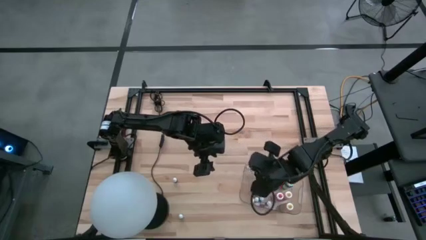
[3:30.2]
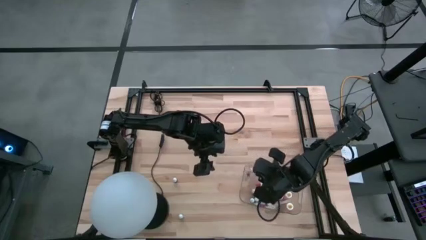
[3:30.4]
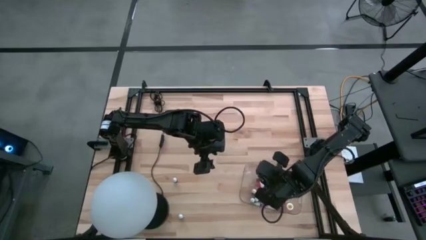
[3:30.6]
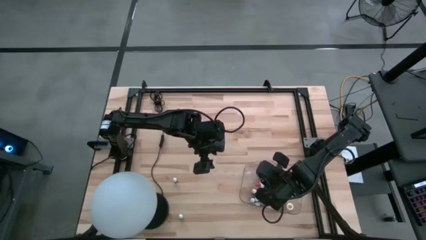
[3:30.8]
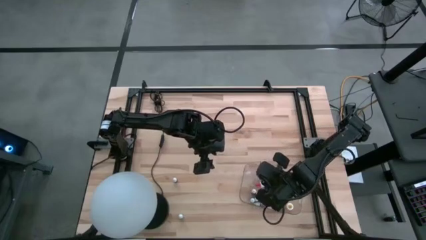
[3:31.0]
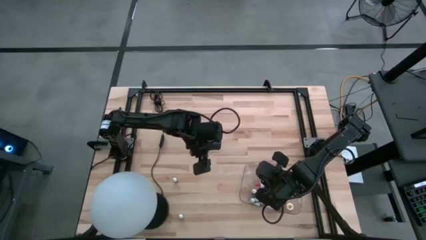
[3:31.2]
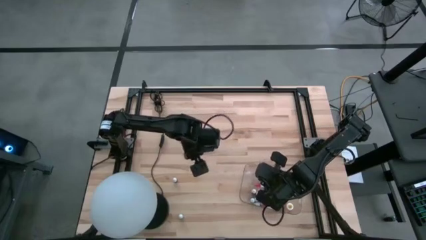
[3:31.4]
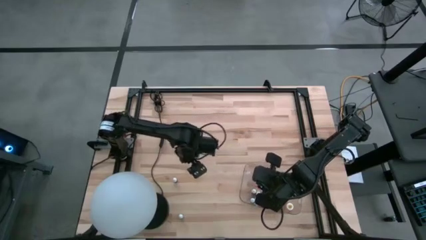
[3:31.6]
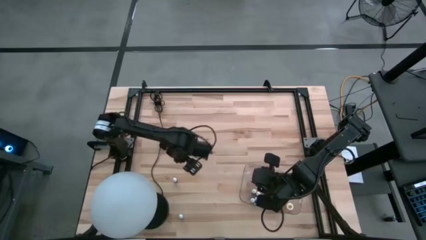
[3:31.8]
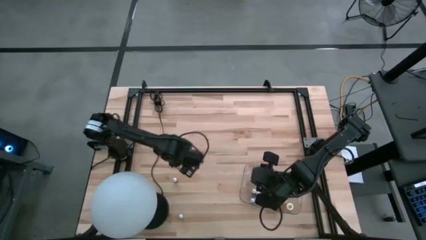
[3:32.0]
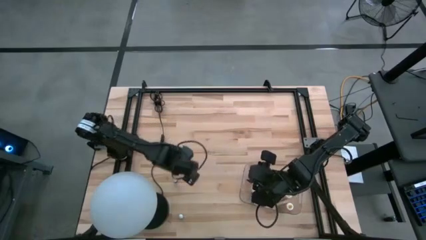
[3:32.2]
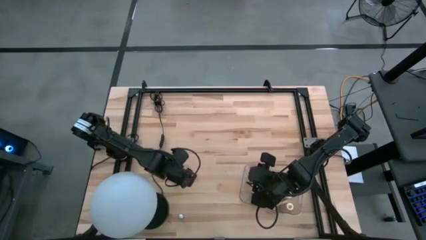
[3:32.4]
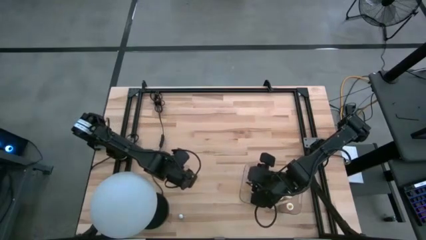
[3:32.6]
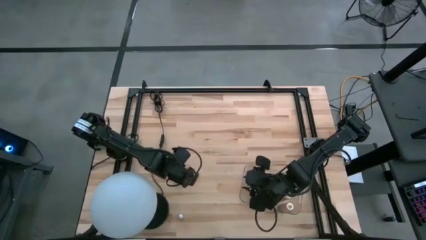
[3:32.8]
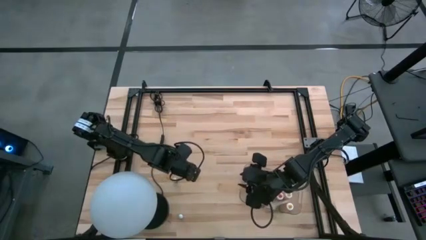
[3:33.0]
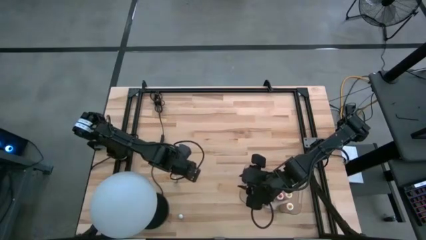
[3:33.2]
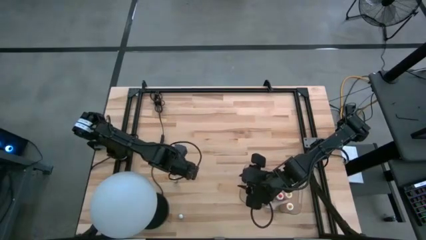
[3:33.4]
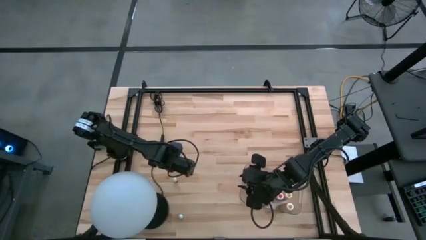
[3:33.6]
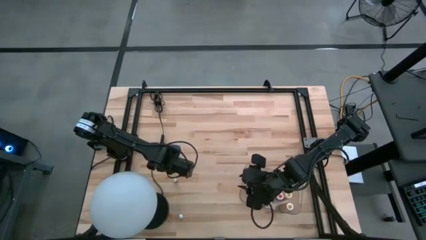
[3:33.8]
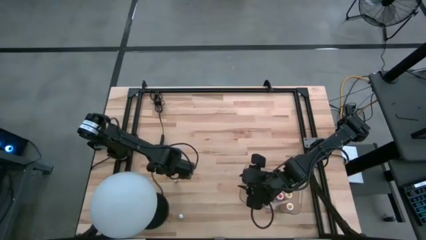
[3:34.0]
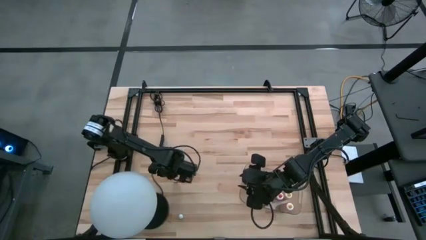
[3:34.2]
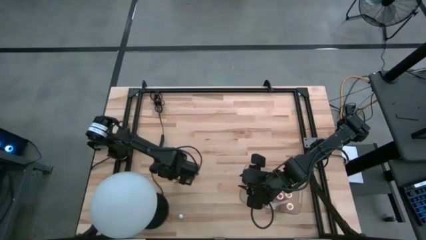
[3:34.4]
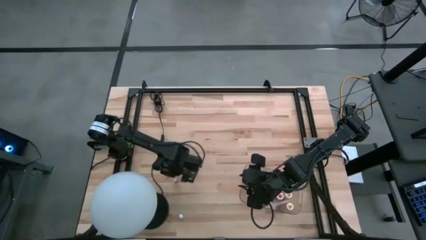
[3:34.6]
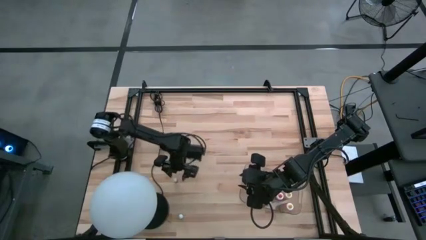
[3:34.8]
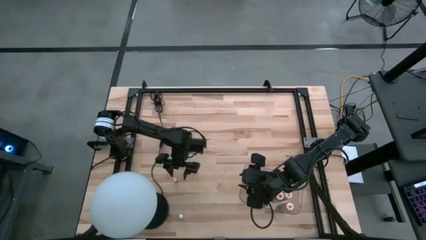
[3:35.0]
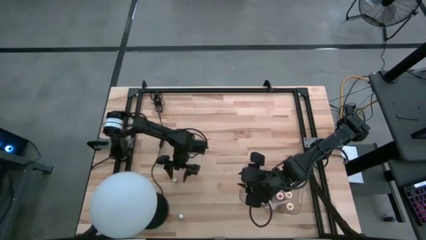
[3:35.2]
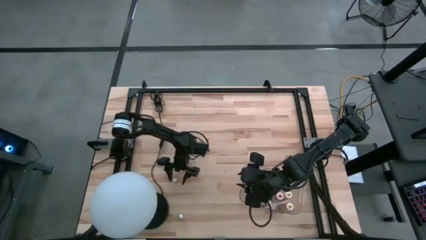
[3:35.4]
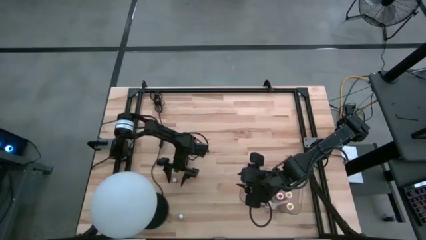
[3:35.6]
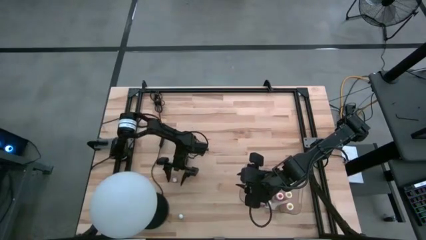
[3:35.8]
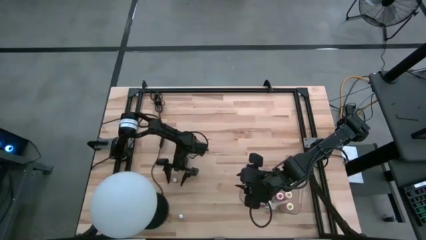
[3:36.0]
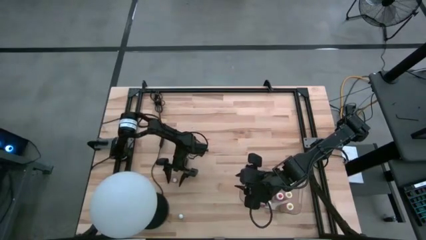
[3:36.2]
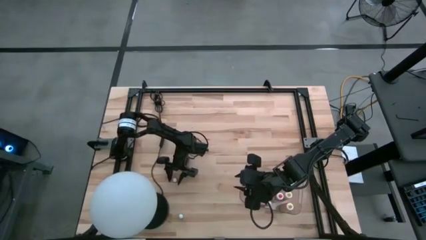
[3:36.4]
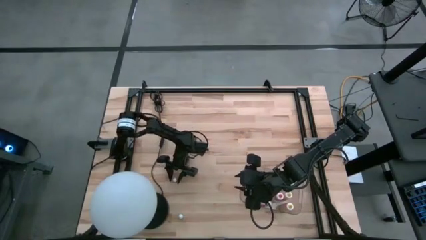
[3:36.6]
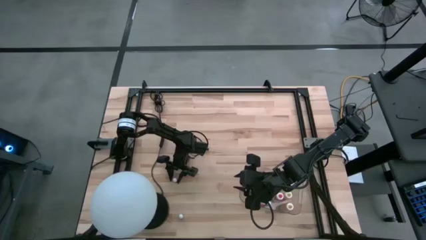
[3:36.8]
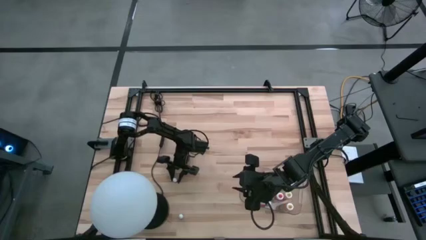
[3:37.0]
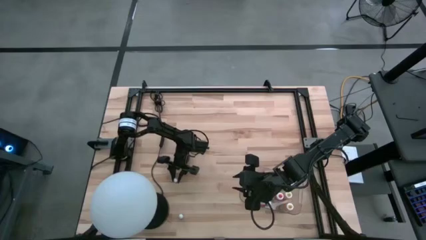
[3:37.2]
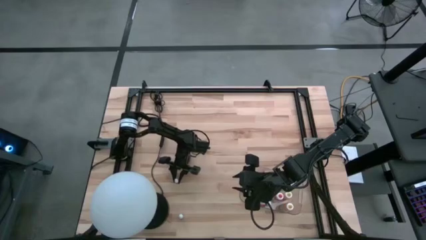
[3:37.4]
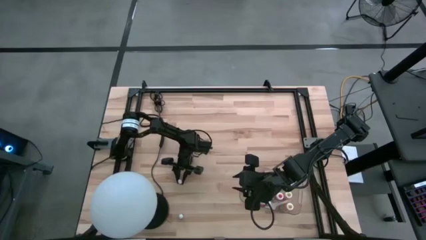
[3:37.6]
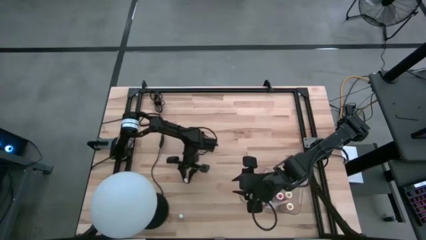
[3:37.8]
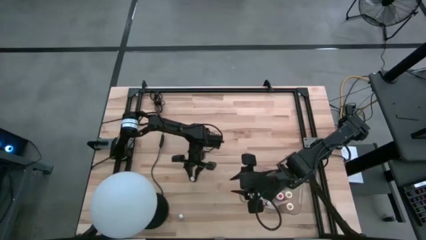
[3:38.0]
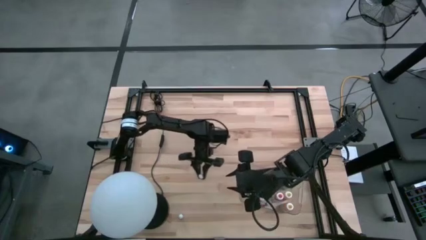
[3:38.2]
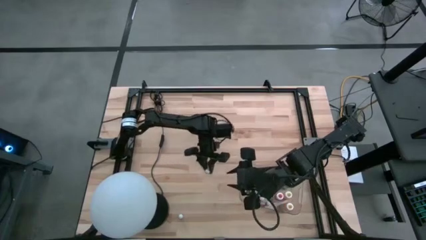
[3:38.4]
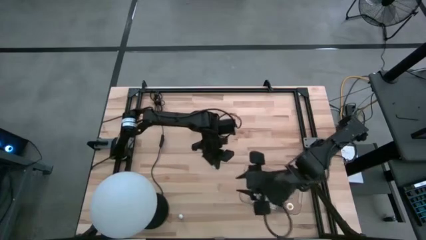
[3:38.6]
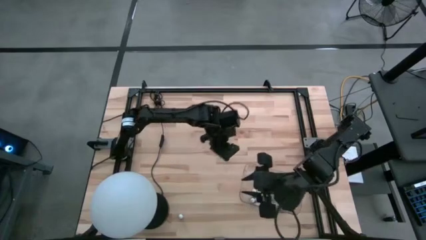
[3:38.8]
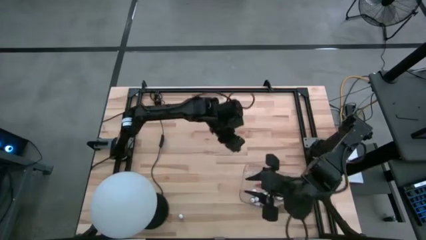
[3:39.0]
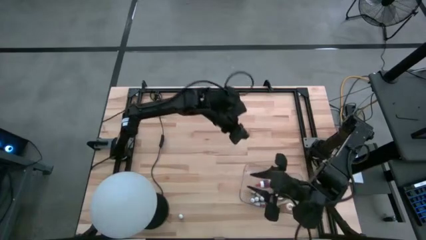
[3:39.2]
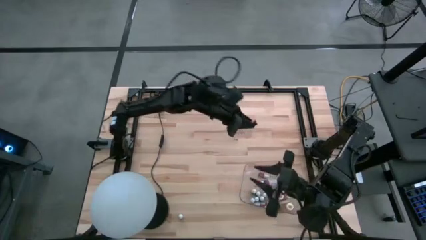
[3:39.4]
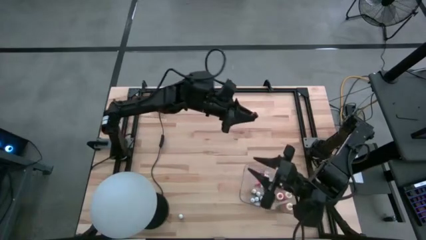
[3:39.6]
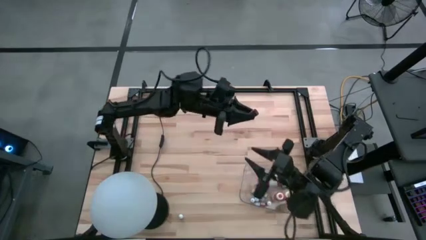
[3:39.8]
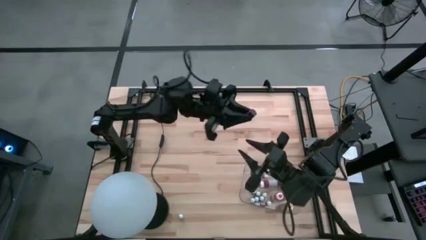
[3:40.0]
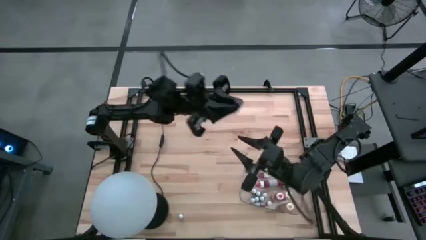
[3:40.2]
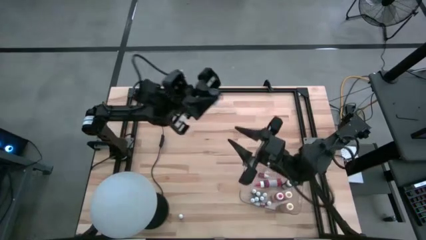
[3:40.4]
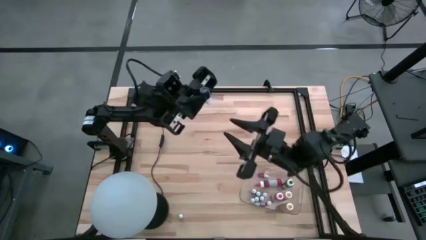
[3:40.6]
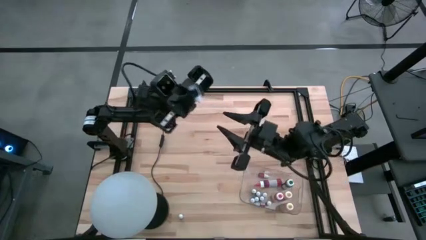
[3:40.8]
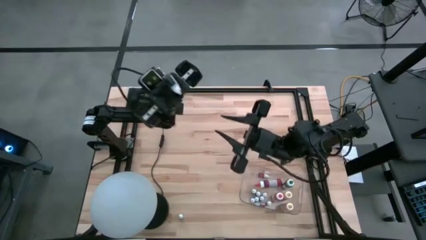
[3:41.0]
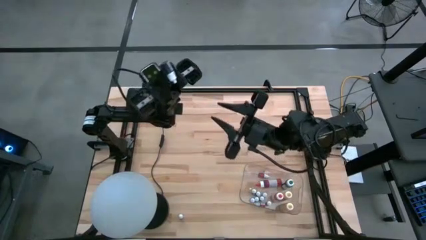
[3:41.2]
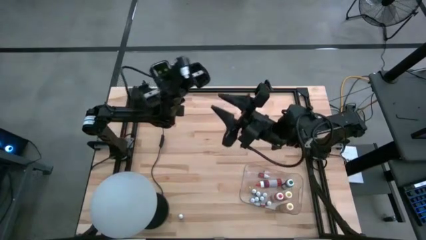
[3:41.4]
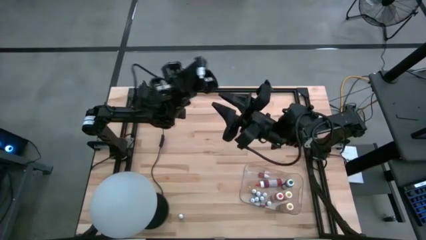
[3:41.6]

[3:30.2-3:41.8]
Task: Pick & Place food coloring
Put the pink food color into the transparent bin

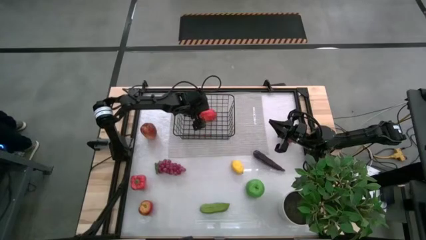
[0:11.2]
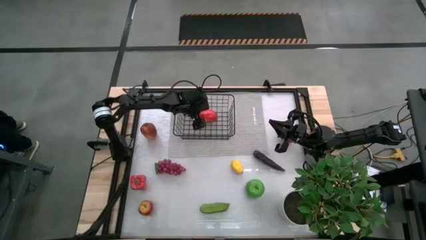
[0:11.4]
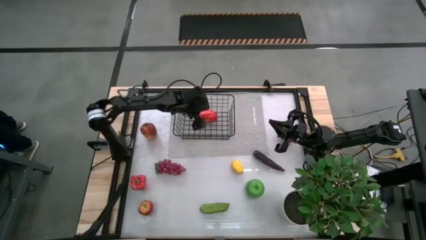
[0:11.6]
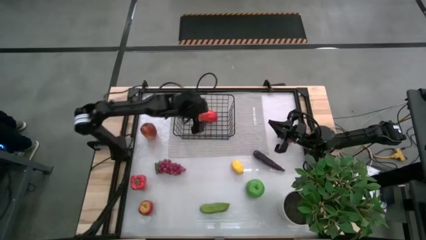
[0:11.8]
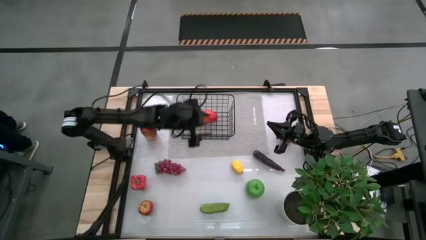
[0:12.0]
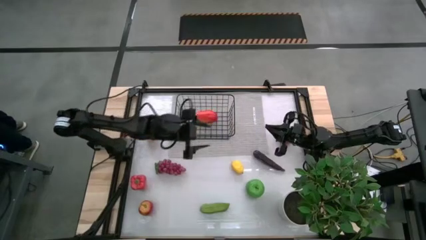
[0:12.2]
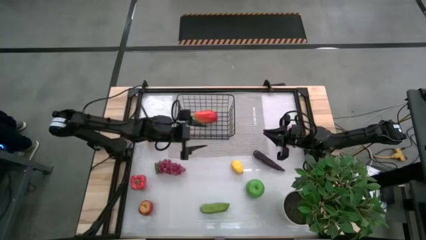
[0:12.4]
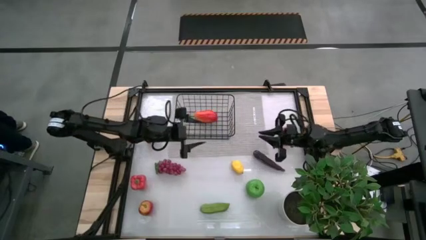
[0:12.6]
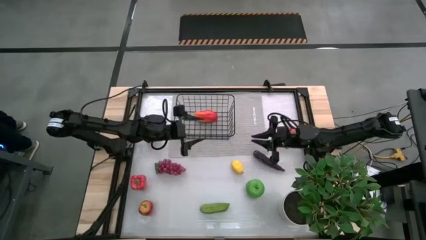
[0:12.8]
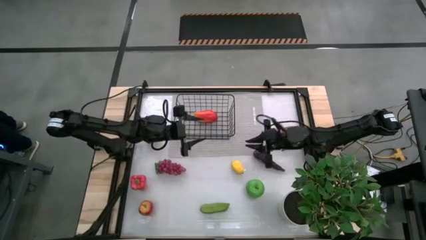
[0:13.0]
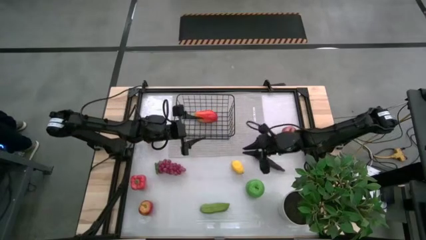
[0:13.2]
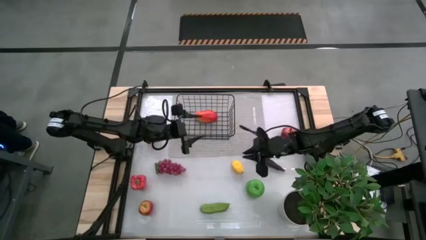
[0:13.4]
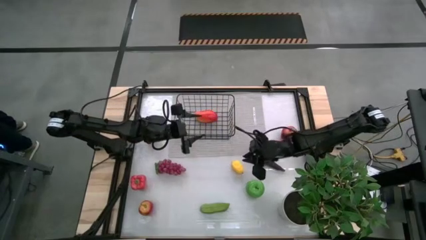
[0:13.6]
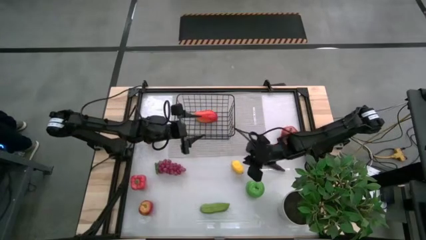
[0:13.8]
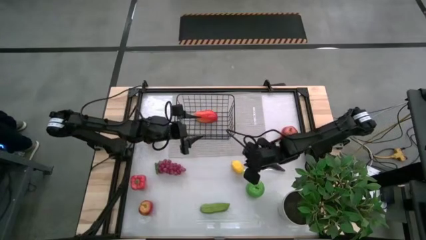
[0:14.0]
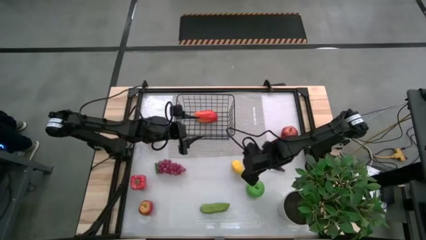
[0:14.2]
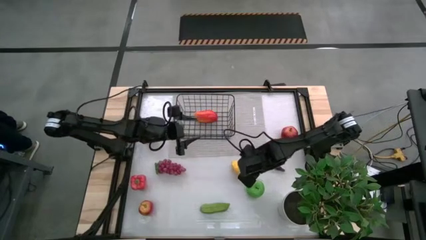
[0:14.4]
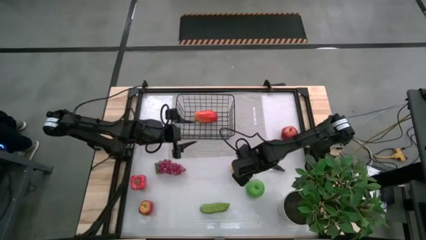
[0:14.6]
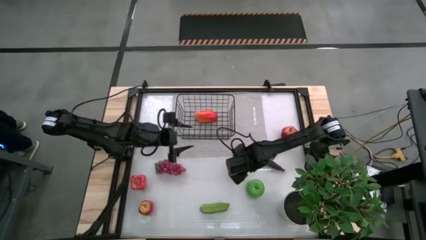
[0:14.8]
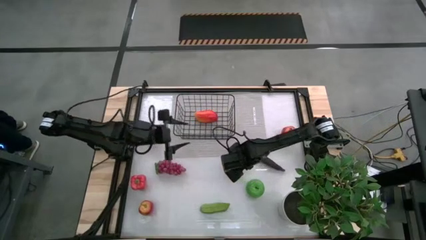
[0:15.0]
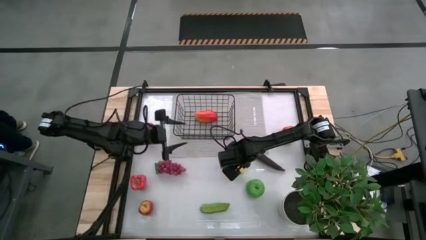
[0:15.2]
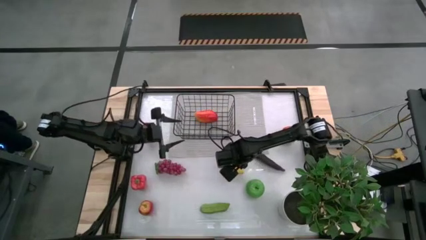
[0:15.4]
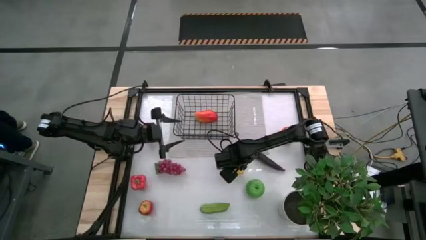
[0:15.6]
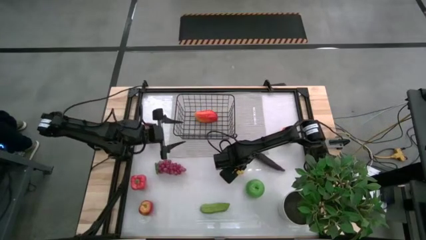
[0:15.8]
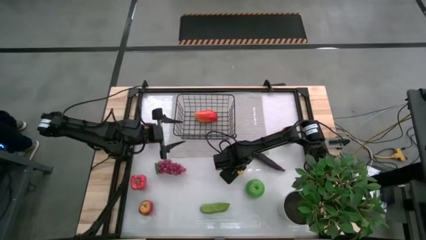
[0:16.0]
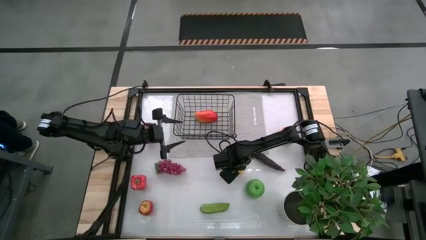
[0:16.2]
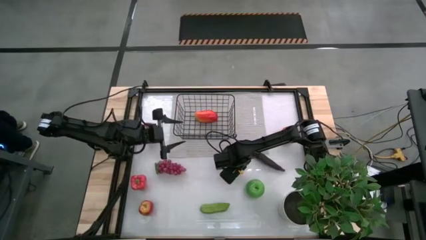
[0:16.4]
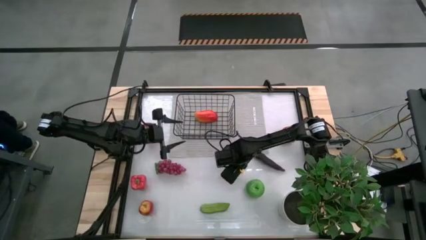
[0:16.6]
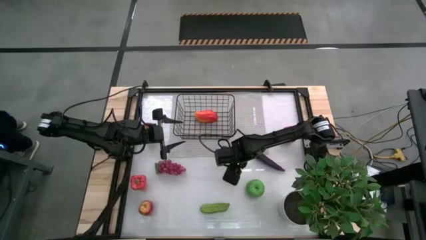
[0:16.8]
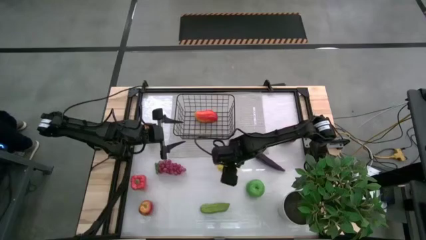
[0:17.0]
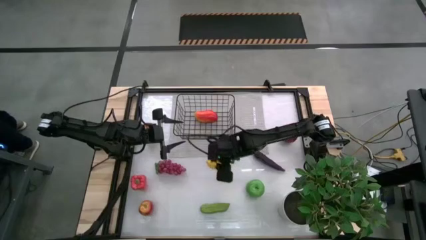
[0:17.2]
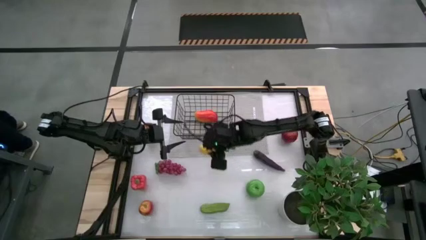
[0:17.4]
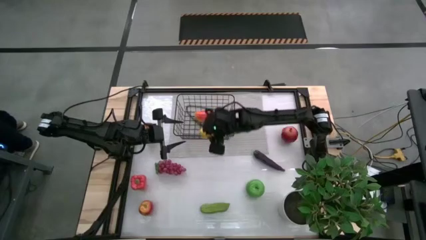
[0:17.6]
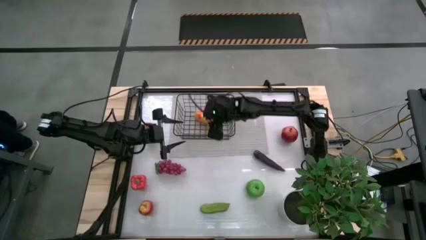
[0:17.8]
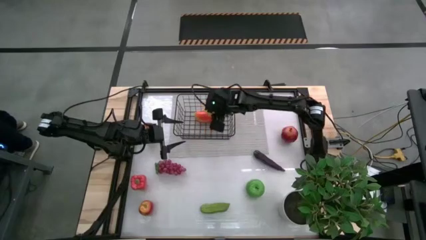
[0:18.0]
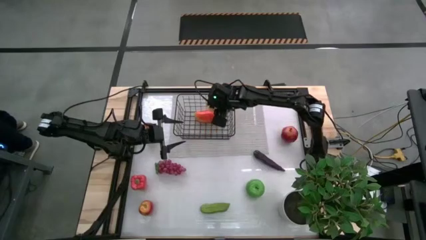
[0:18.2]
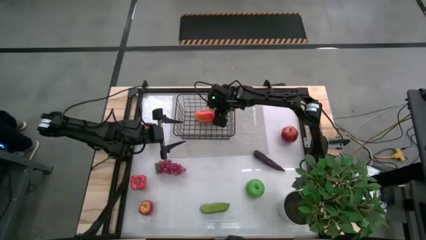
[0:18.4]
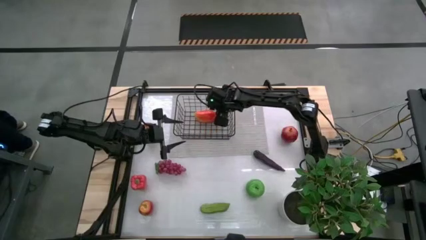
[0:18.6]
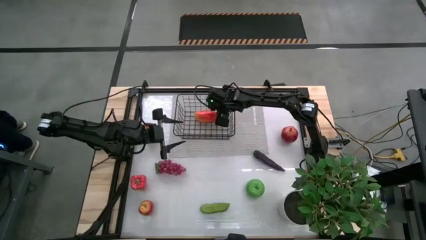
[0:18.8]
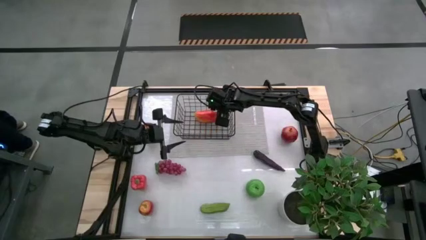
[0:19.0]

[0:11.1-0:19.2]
Task: Build produce basket
Put the lemon into the wire basket
